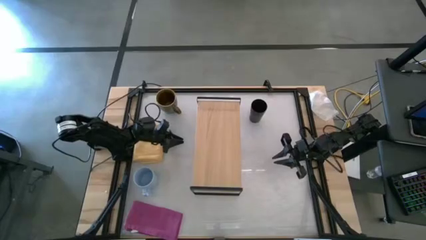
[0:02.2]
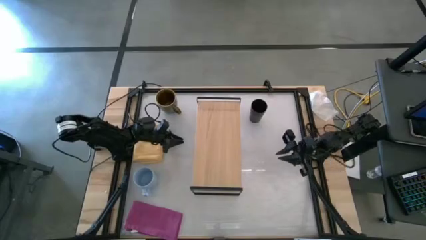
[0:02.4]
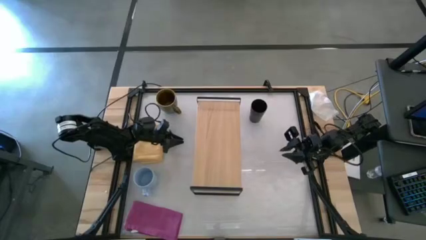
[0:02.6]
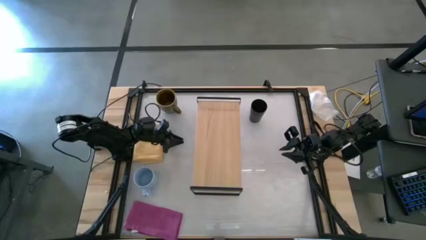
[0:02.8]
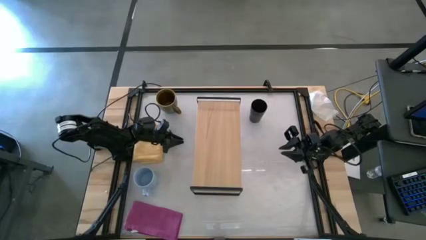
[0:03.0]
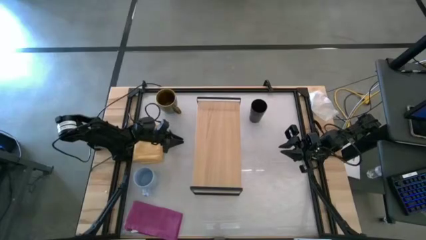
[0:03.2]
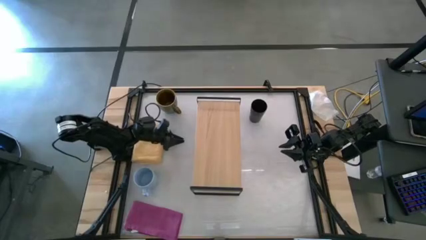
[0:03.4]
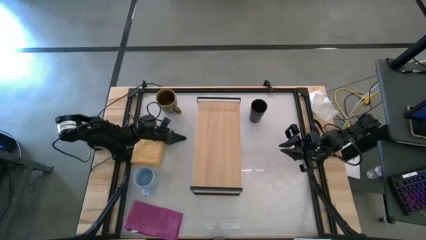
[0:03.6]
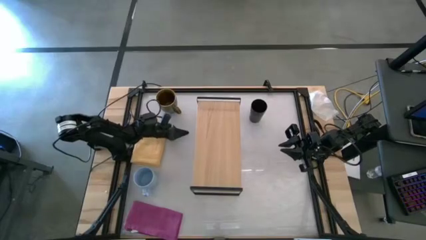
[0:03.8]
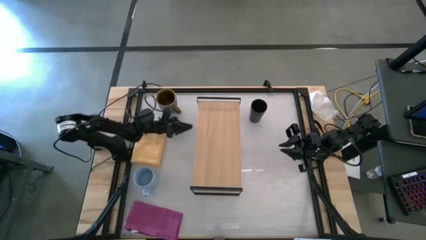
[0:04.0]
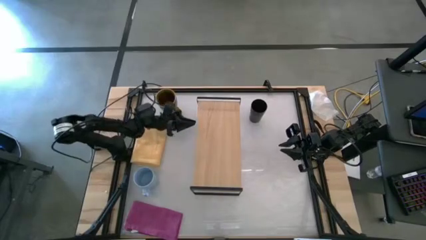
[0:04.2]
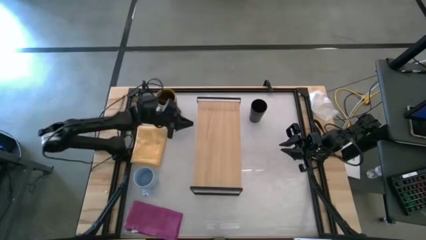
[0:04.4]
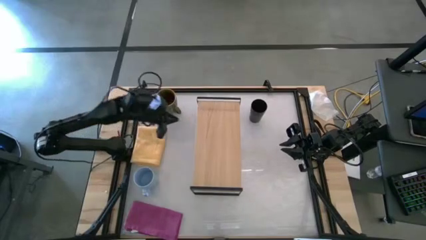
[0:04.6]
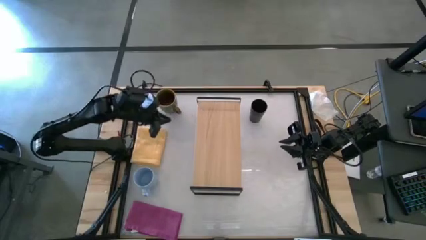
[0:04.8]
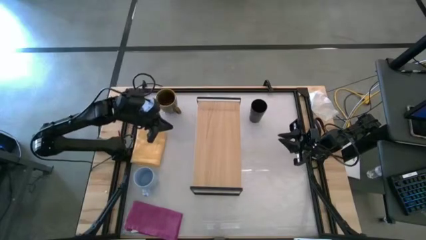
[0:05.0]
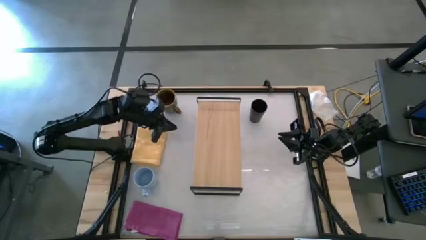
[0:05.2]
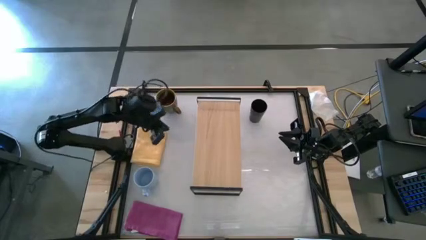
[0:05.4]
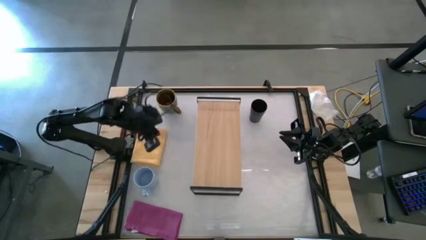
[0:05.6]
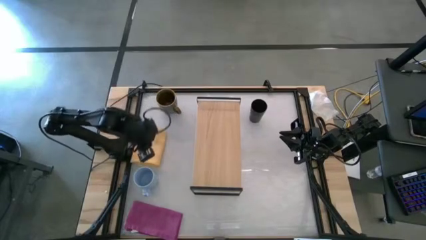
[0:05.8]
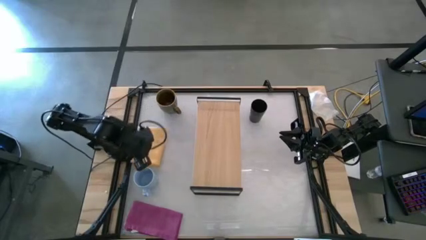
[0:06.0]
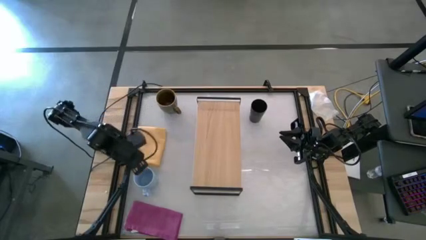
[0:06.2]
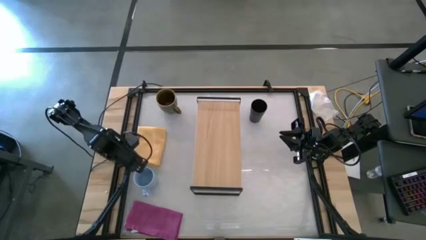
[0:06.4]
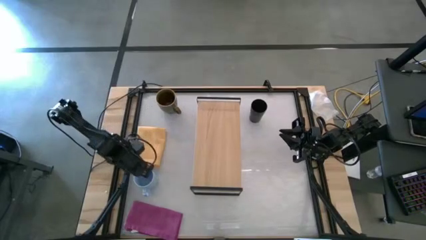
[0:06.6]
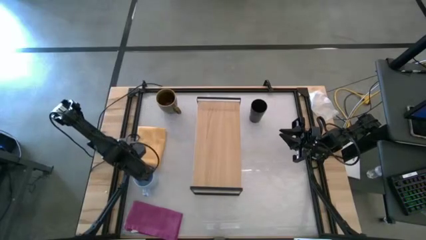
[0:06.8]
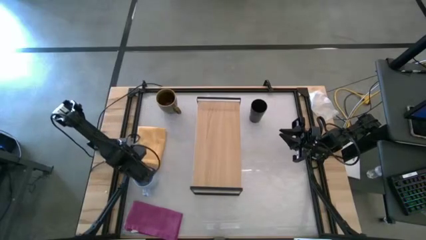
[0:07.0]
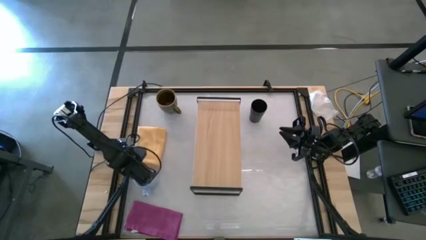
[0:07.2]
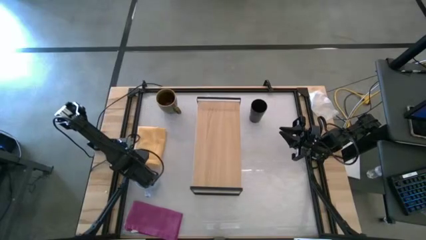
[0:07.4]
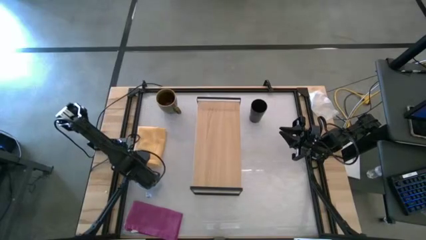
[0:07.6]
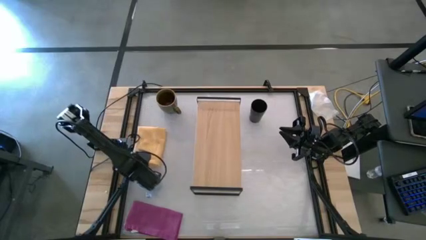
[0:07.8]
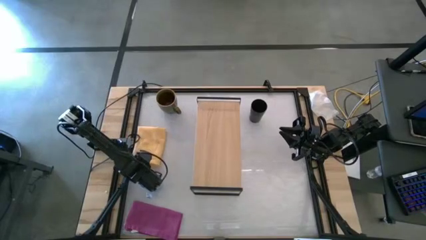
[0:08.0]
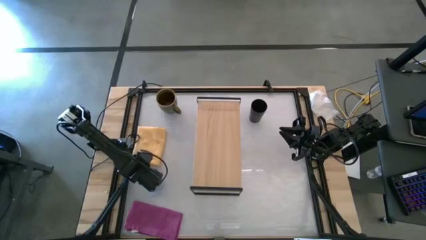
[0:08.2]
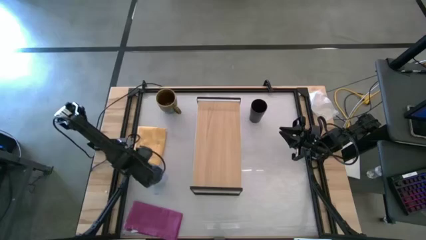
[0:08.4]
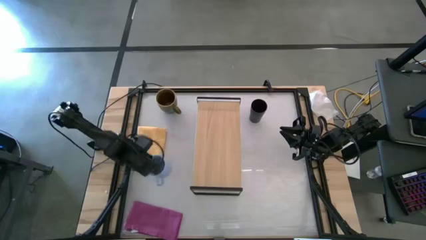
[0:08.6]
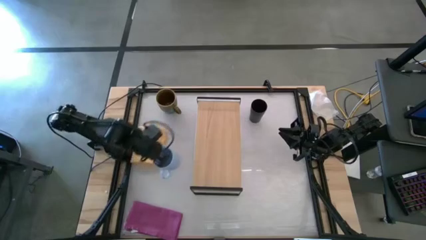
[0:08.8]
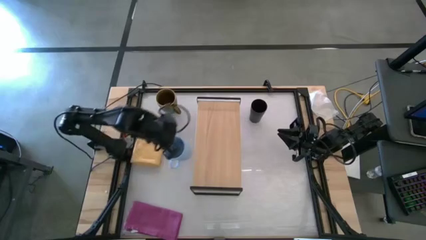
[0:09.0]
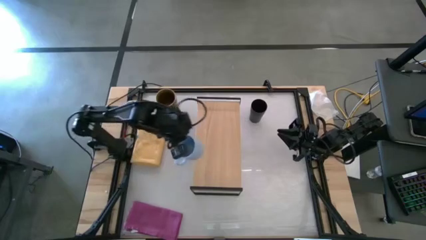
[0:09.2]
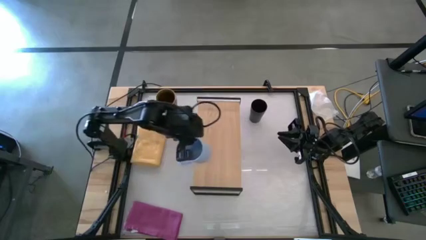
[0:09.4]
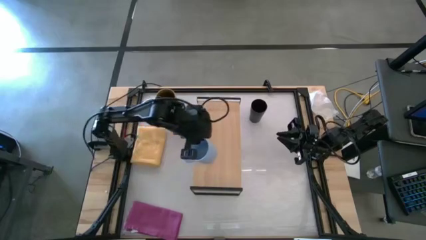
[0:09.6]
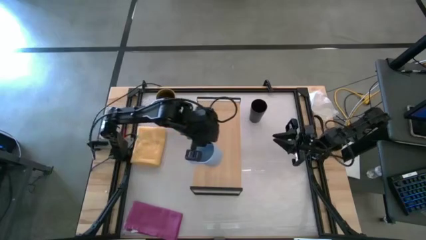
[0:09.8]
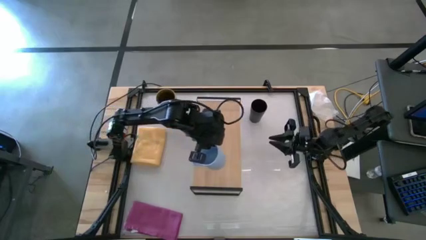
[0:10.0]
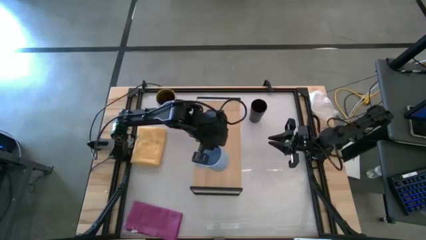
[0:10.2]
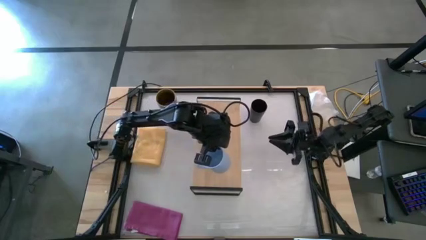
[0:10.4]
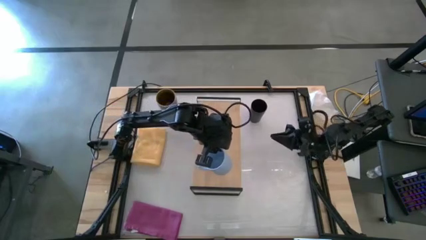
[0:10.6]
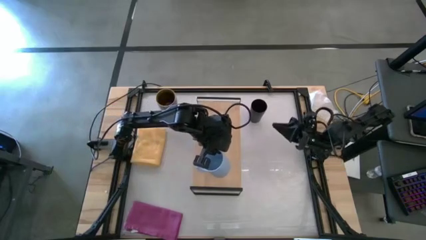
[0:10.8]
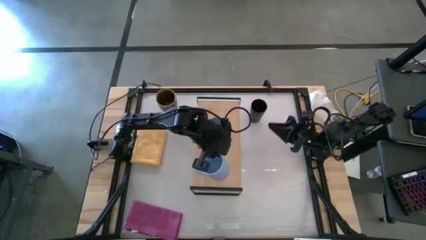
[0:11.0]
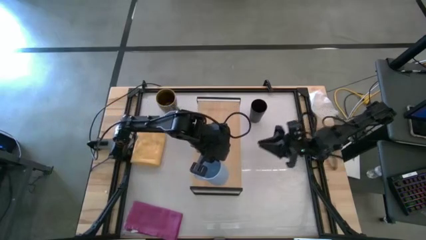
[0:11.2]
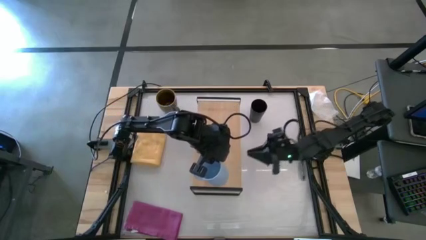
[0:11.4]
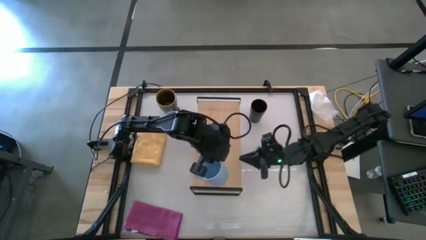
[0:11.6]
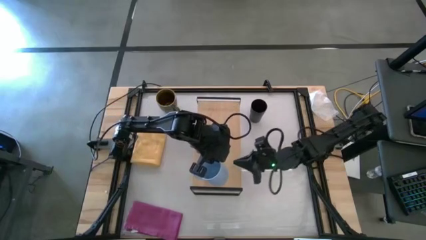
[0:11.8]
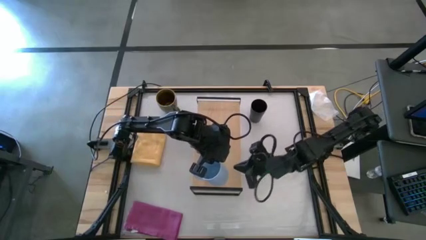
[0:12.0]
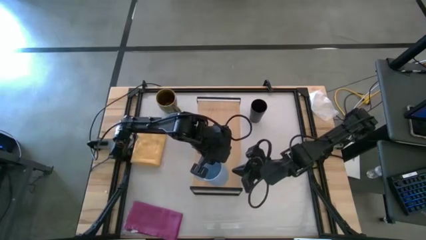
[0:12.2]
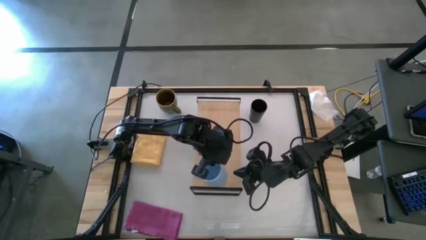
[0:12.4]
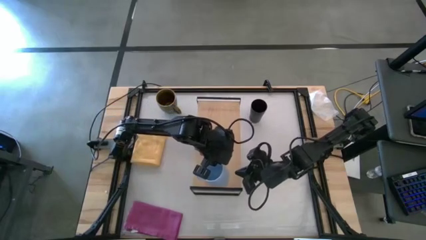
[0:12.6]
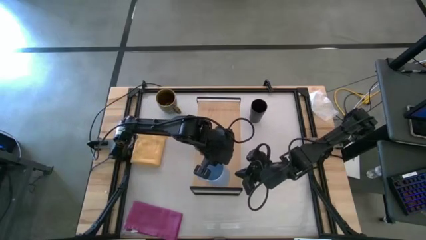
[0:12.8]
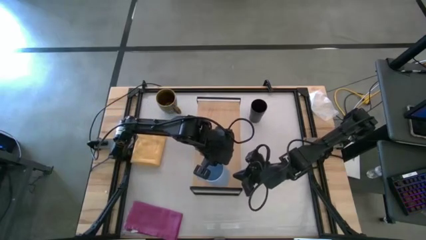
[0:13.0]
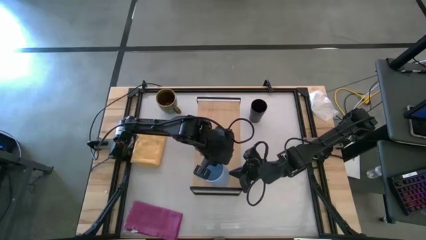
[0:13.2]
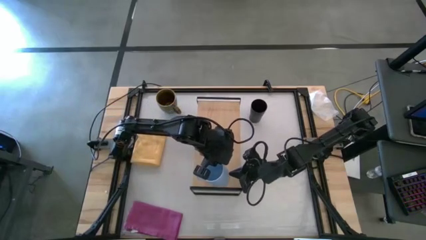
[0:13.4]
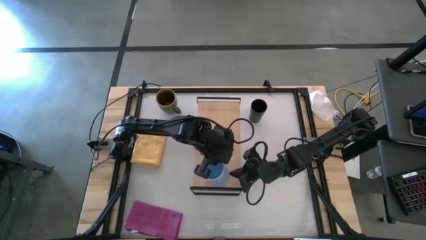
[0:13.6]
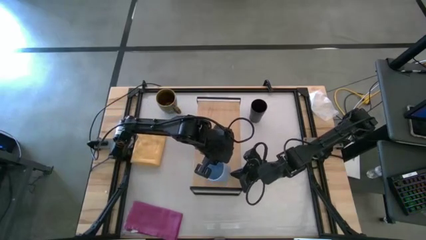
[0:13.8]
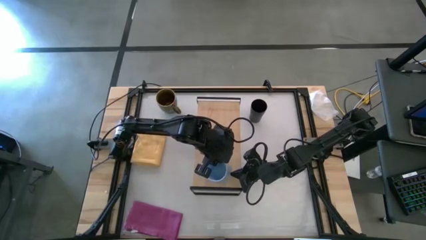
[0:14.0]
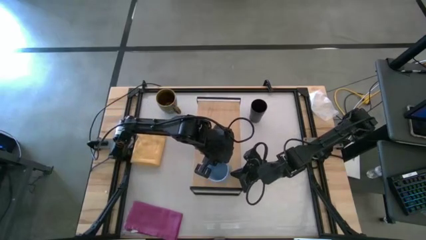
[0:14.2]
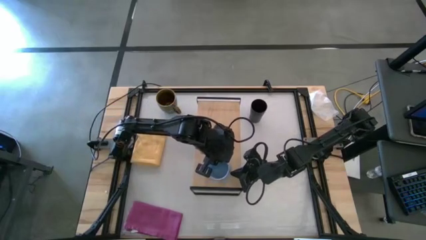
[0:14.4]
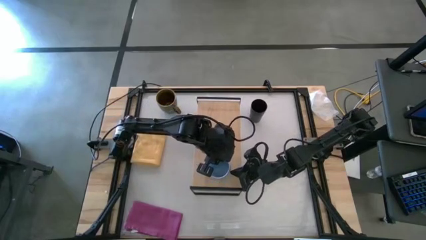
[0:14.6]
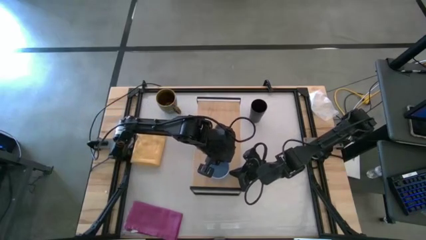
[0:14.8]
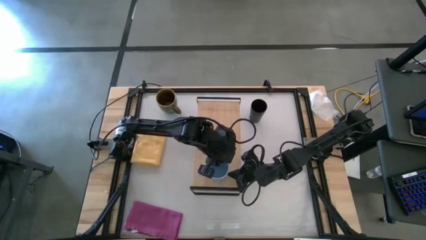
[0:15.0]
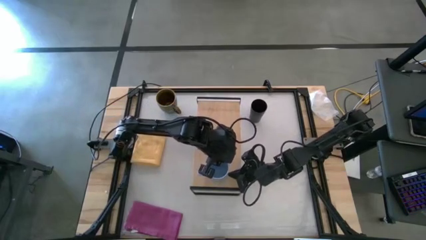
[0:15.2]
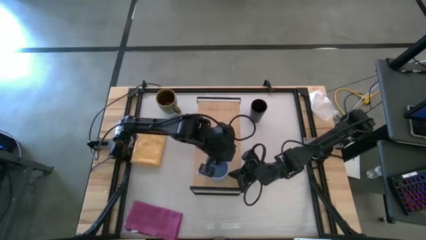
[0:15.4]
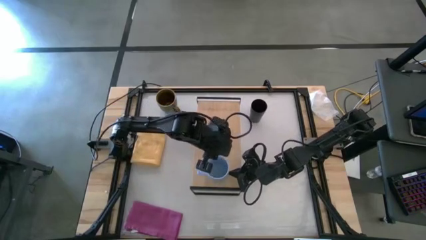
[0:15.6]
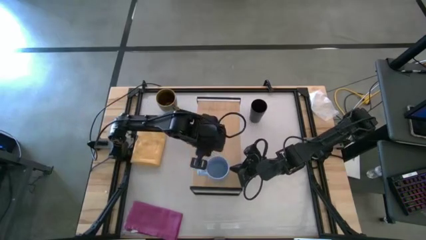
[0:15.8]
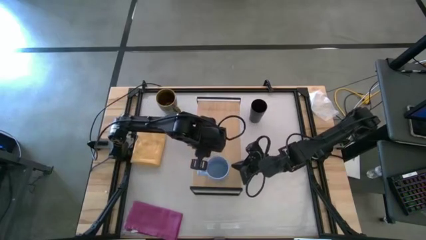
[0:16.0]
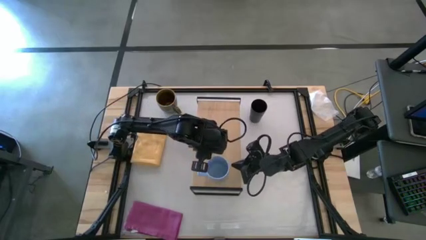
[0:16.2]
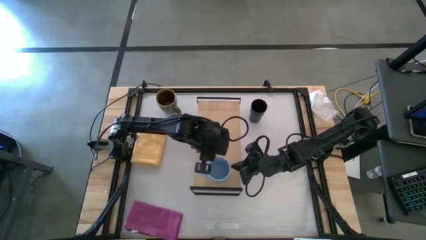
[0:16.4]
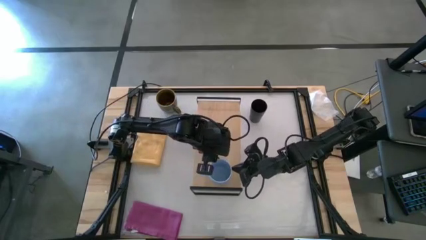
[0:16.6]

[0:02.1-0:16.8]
Task: Stack small to large cups/mugs on shelf
Put the light blue cup on the shelf
